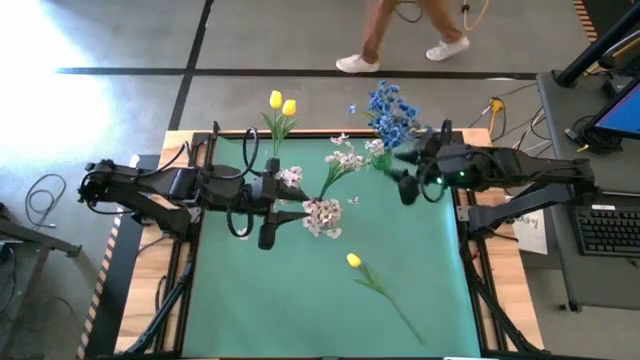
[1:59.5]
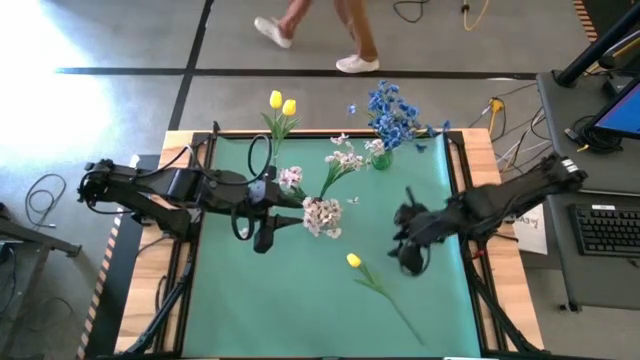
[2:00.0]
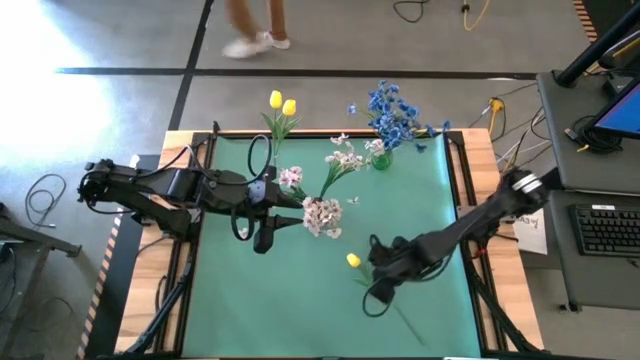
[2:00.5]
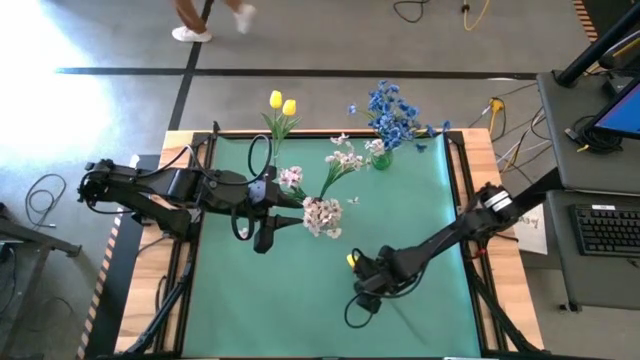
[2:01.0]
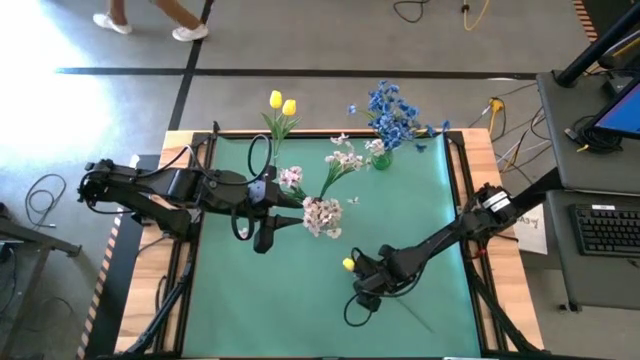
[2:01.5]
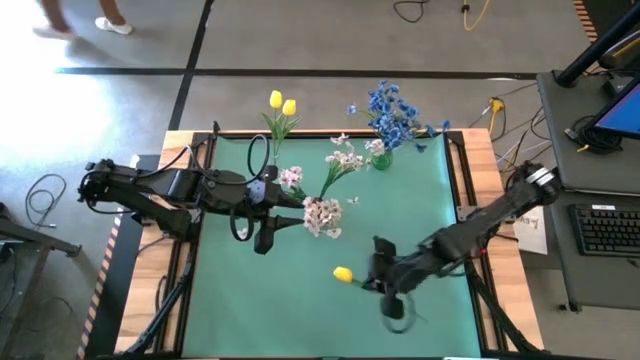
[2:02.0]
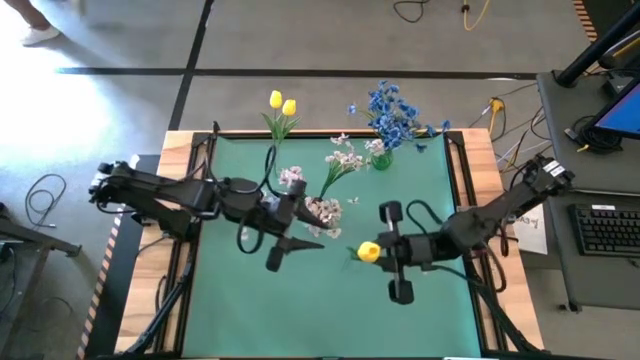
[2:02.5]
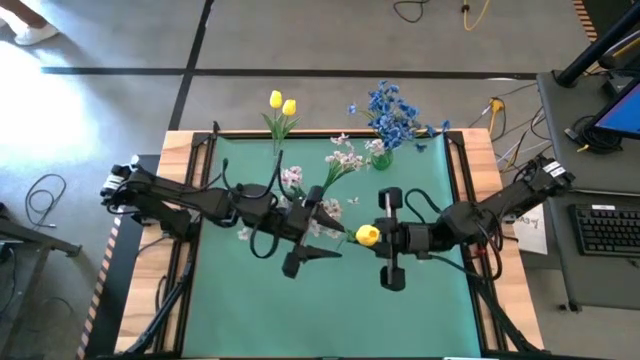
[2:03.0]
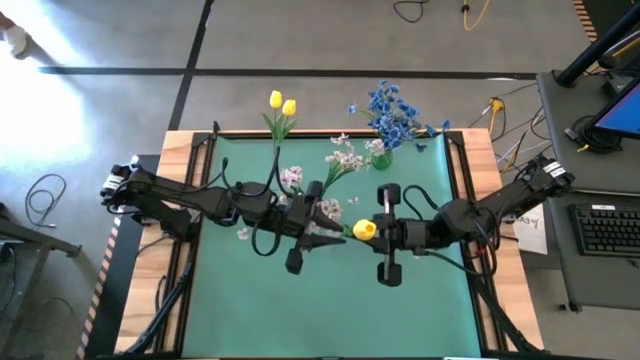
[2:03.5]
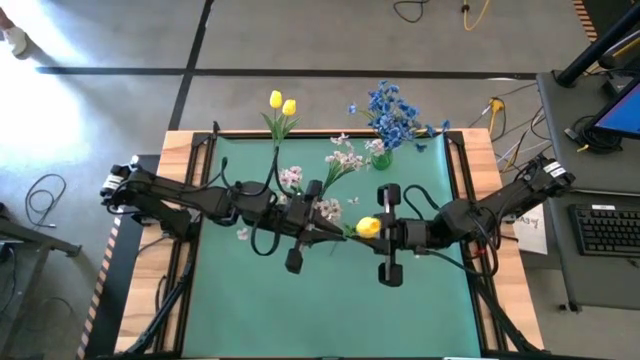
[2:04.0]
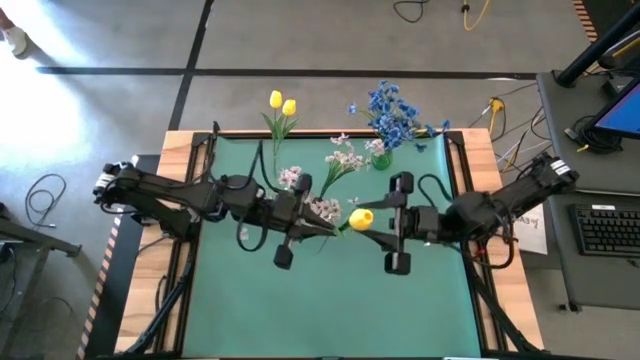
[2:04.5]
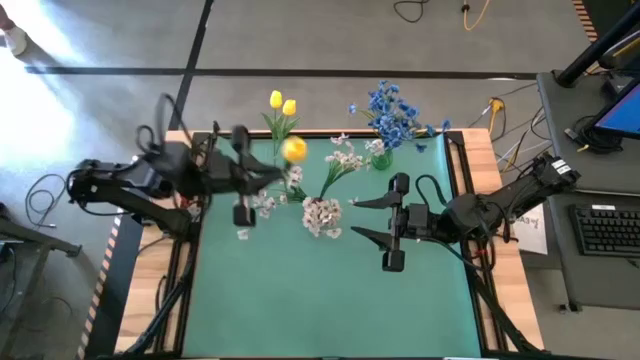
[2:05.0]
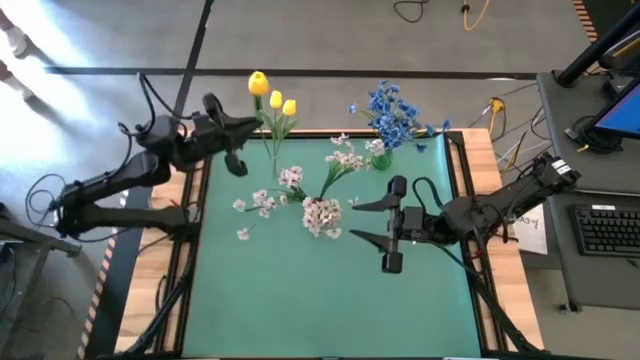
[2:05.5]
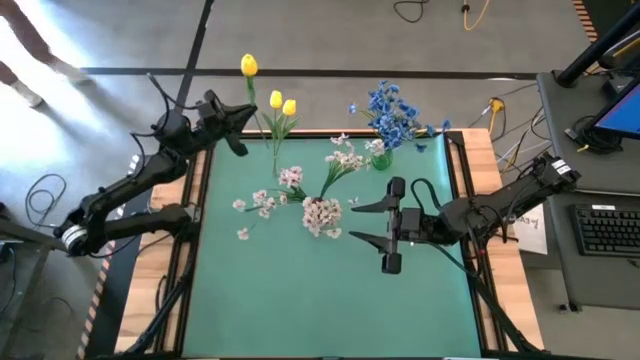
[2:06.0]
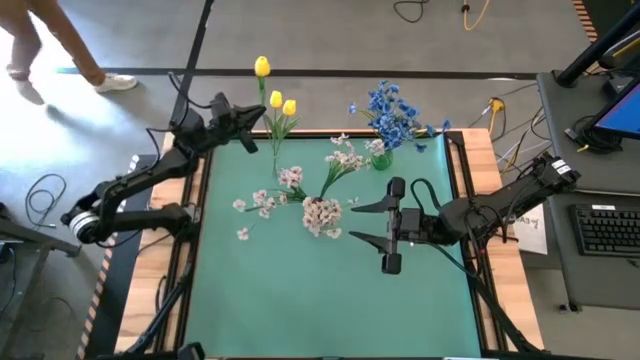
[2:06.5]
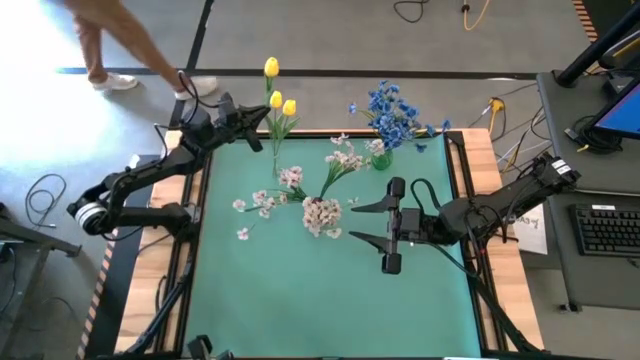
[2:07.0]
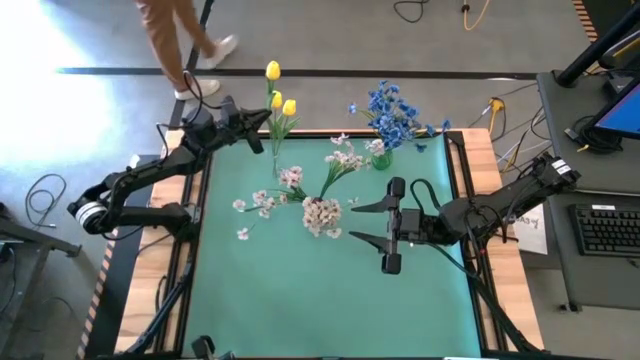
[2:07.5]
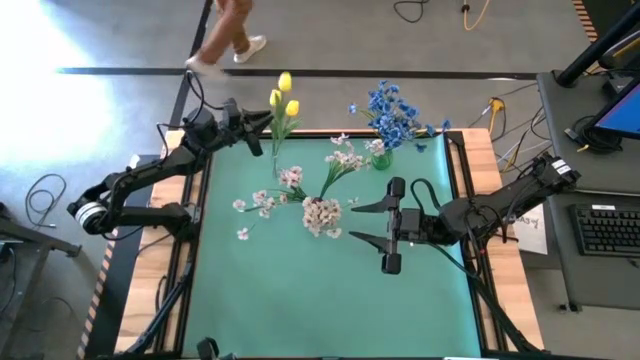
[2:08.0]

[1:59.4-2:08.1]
Task: Sort flowers into vase by color
Put the yellow tulip into the transparent vase

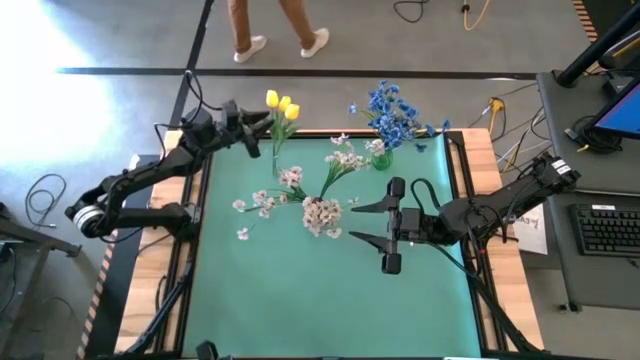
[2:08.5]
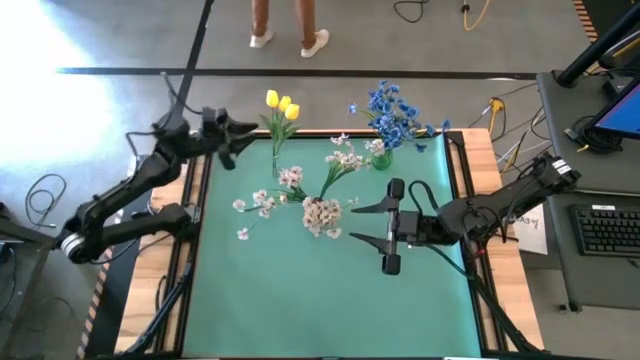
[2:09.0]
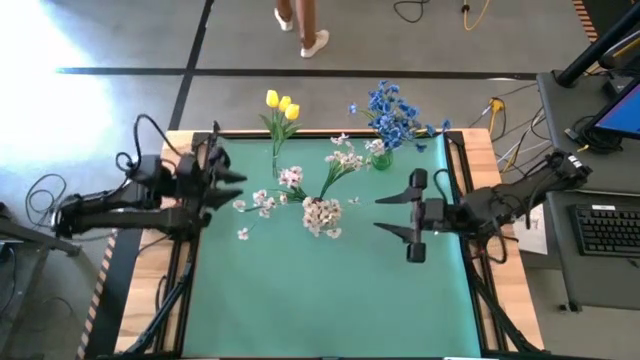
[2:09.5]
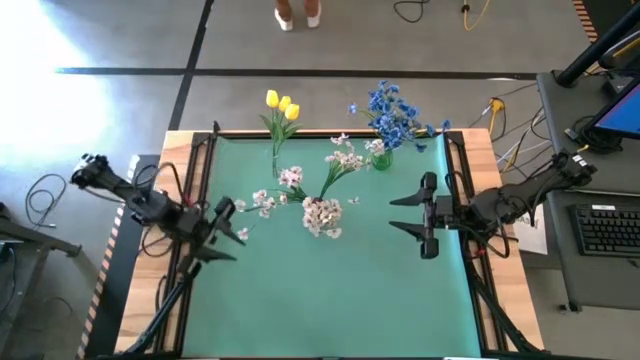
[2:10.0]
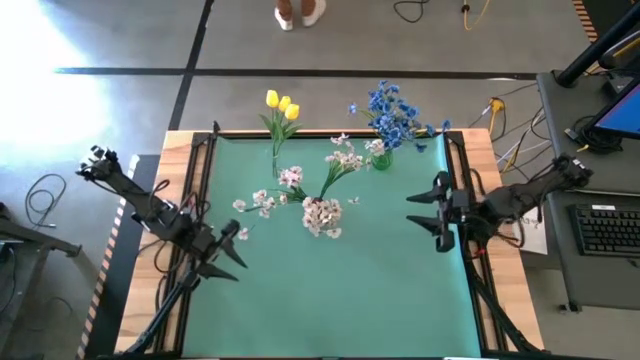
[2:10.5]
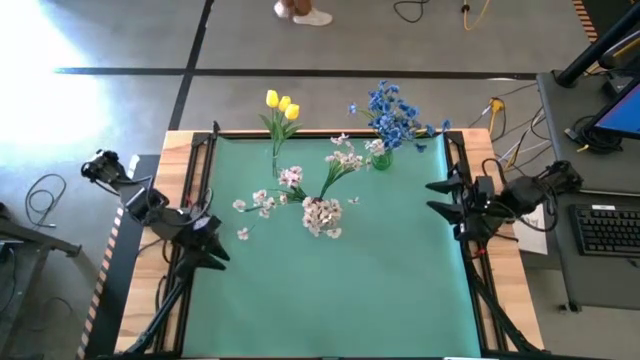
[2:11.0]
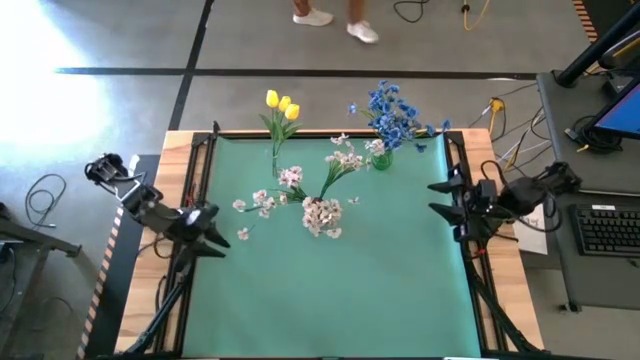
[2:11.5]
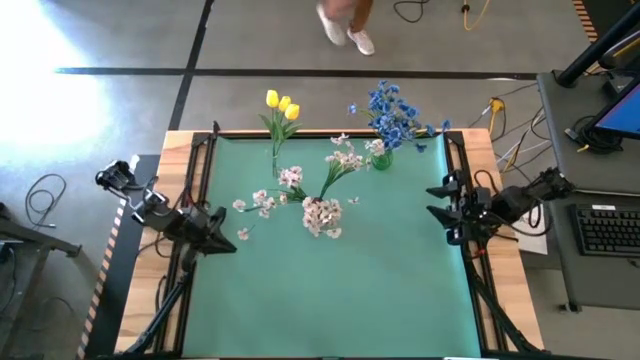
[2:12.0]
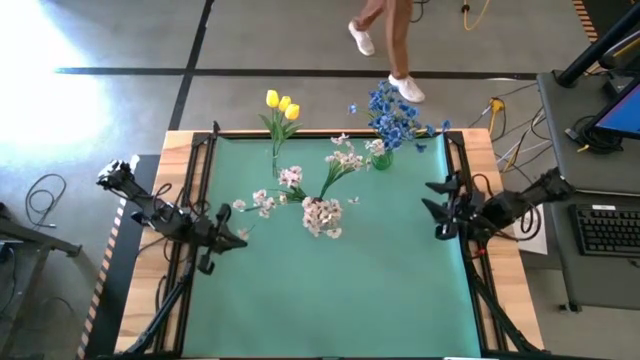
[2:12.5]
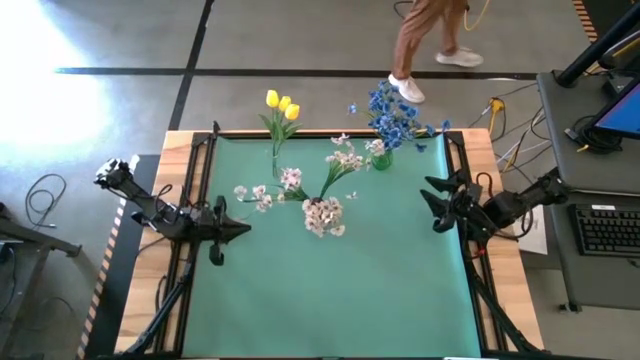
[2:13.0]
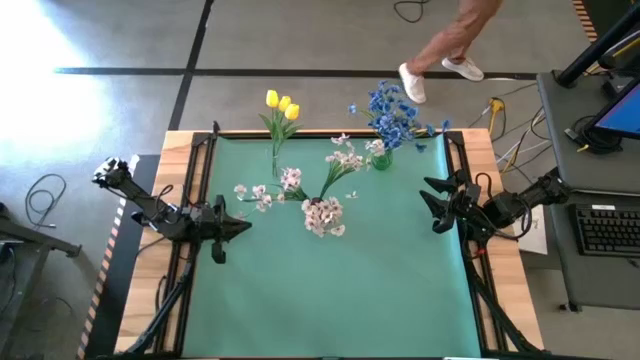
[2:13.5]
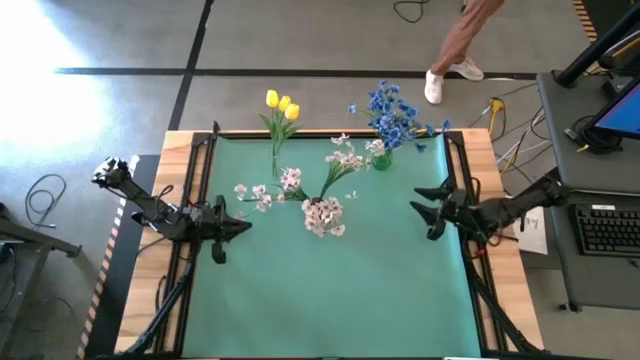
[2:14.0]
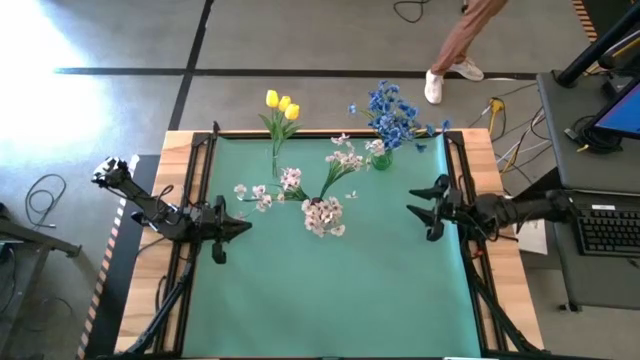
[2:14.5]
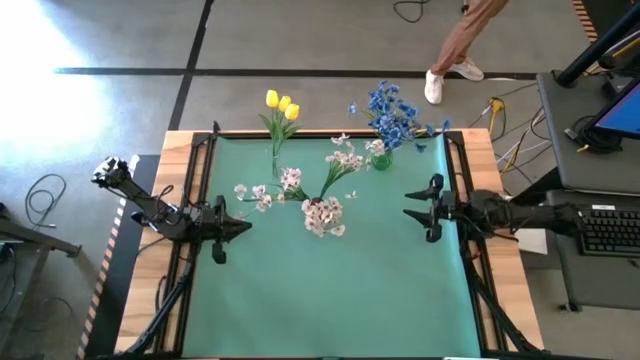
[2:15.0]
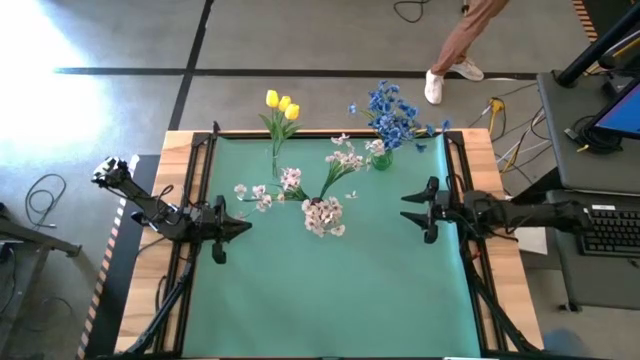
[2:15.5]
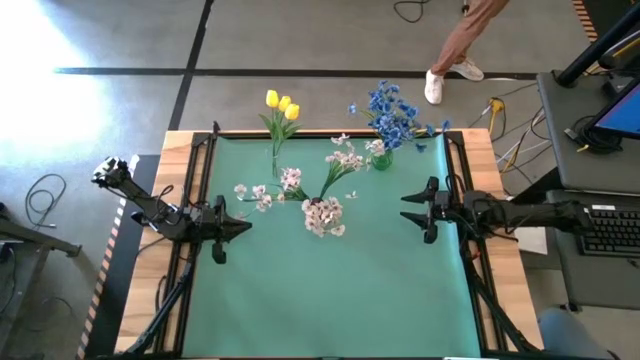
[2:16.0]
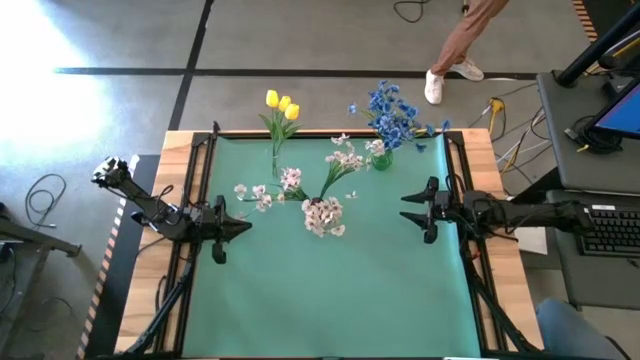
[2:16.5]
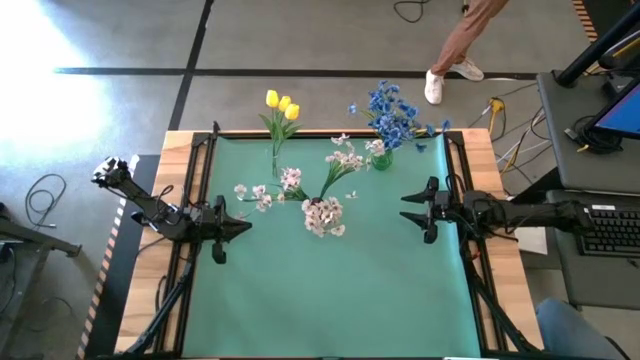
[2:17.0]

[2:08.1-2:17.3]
Return to Home Position
